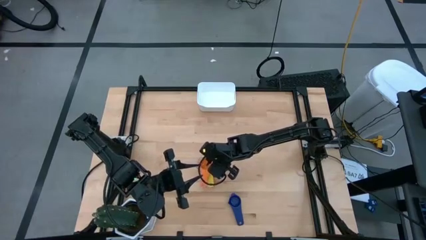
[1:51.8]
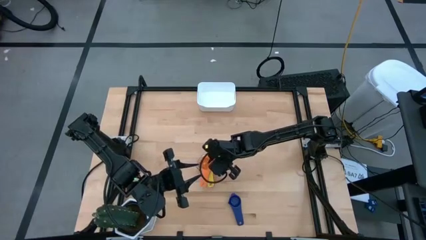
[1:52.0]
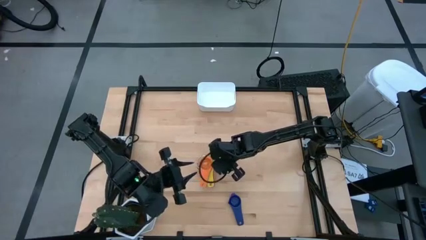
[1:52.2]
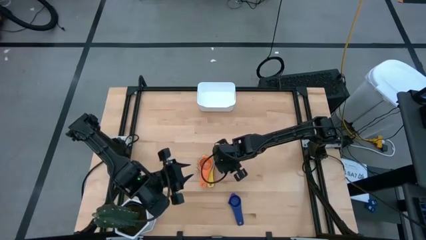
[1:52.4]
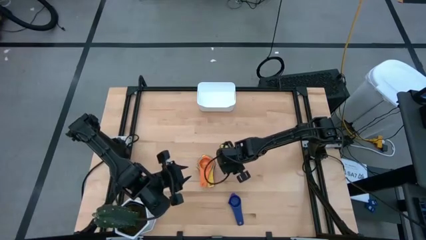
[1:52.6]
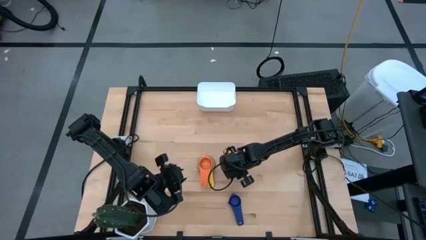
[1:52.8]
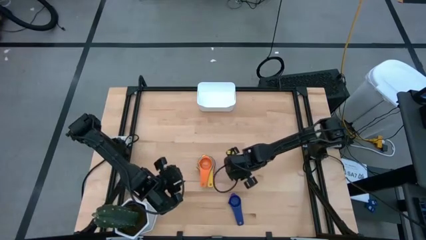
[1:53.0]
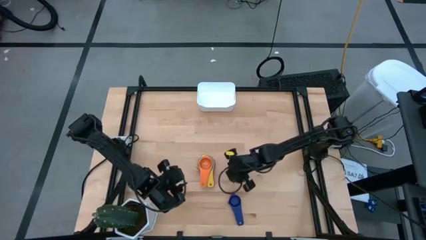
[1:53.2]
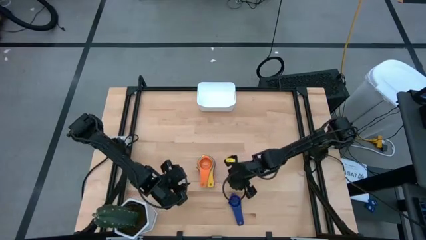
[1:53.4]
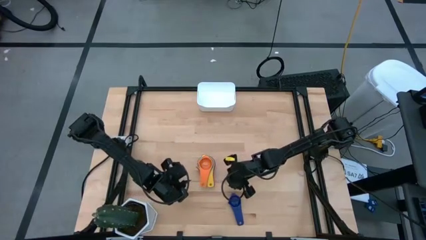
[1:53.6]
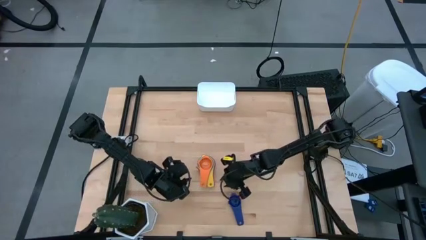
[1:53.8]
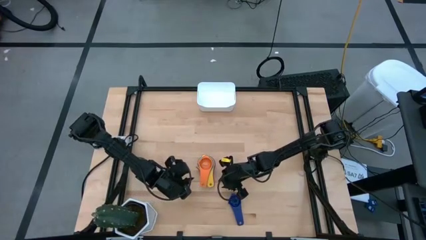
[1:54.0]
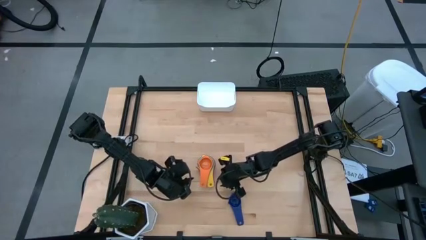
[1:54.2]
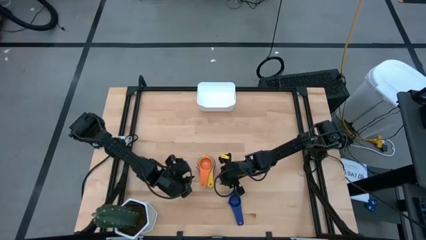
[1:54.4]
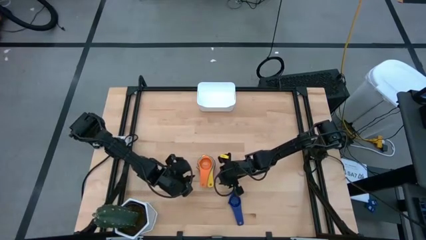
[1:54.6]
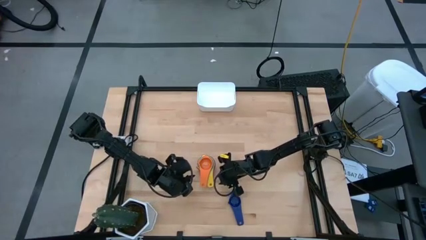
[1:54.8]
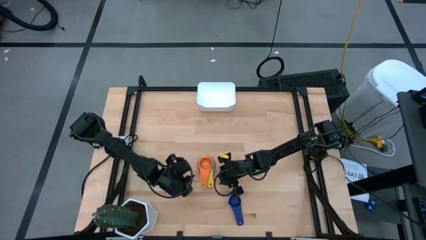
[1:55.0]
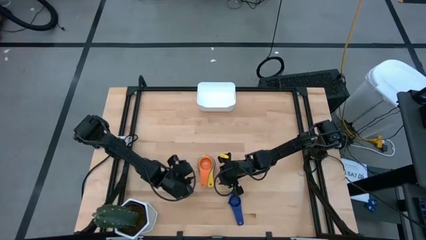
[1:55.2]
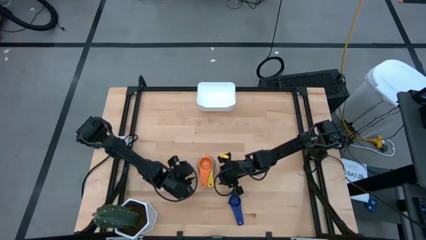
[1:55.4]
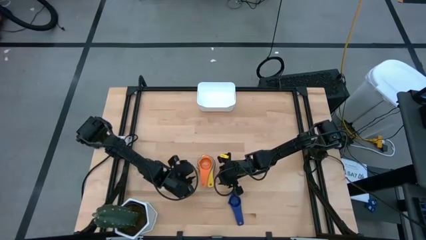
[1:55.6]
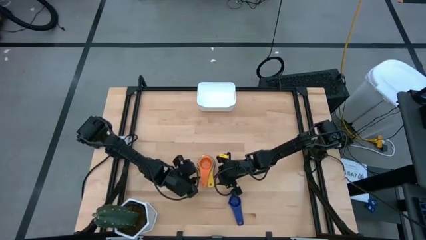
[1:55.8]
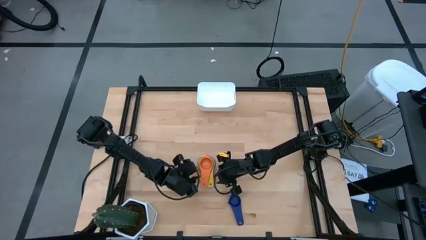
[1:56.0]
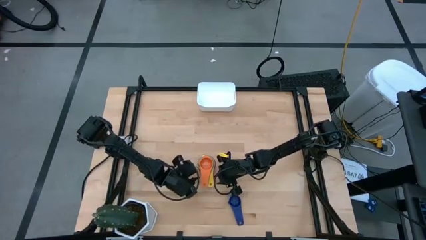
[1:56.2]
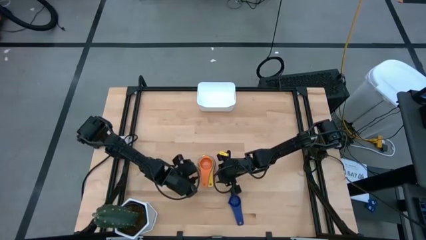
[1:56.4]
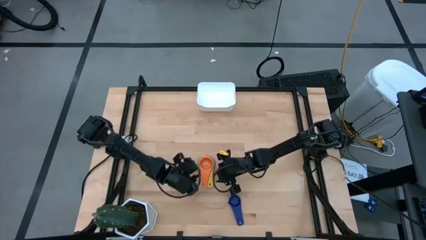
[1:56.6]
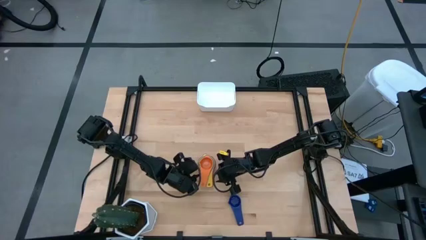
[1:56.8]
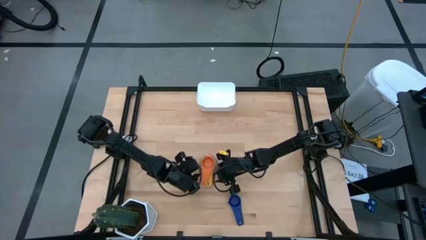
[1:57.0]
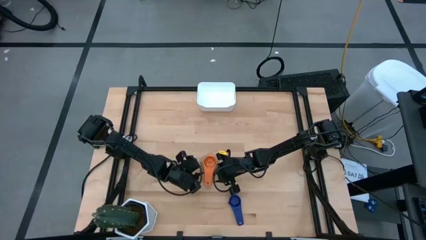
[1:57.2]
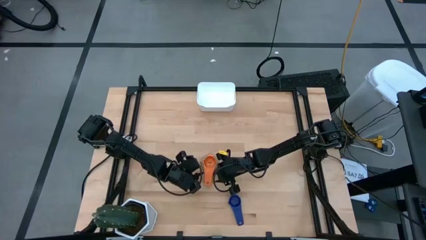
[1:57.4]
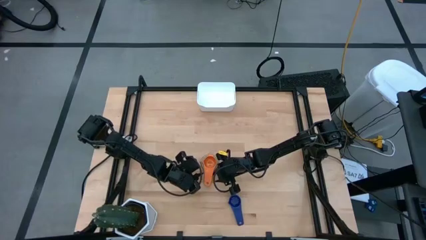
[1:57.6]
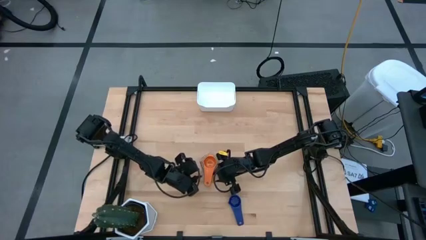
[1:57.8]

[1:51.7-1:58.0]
Task: Nest measuring cups in basket
Adjust the measuring cups

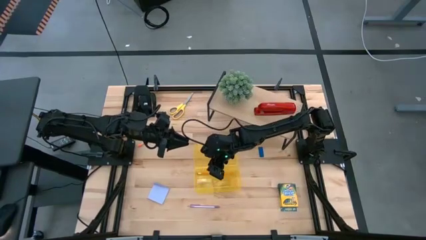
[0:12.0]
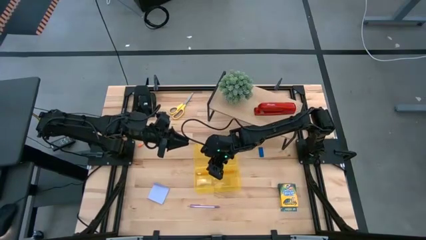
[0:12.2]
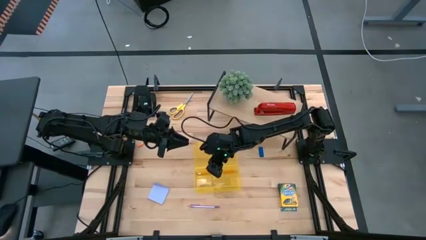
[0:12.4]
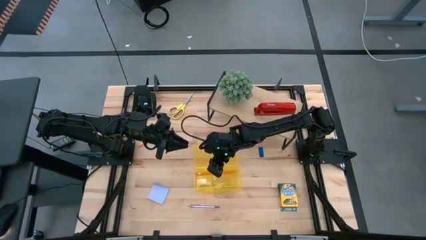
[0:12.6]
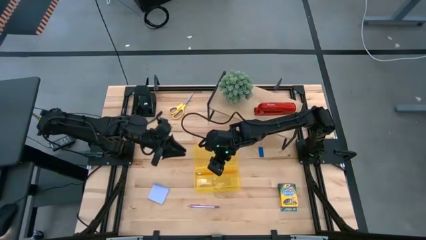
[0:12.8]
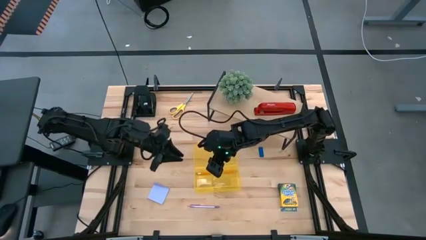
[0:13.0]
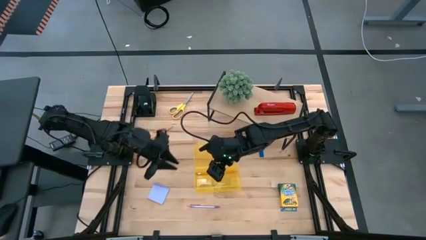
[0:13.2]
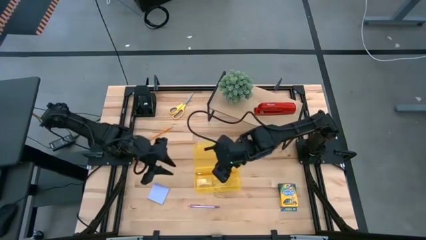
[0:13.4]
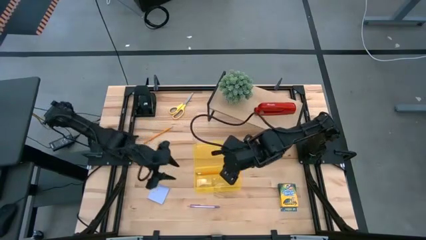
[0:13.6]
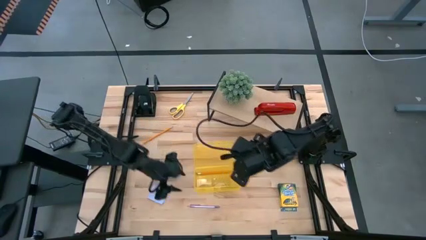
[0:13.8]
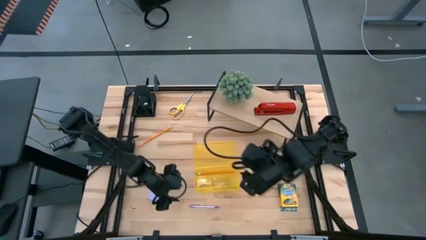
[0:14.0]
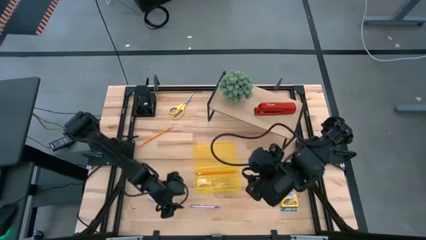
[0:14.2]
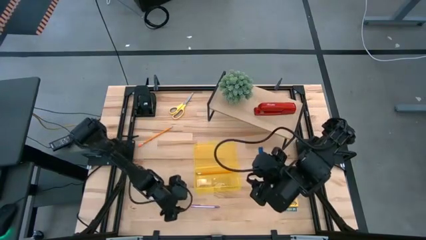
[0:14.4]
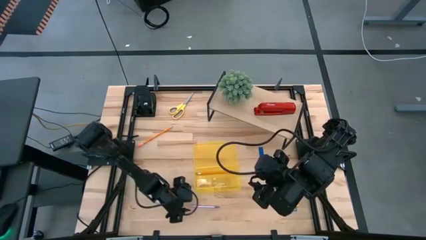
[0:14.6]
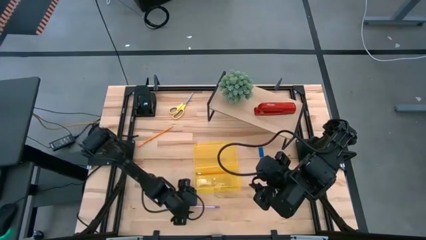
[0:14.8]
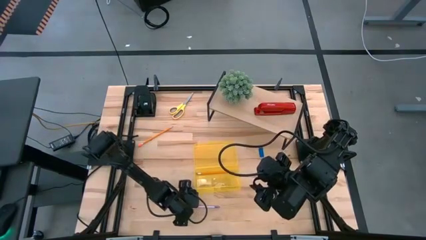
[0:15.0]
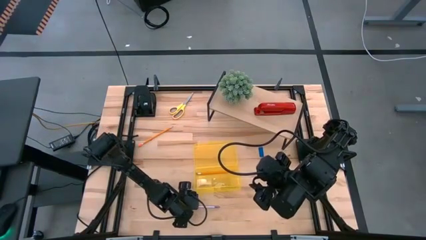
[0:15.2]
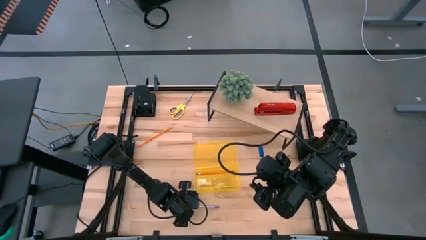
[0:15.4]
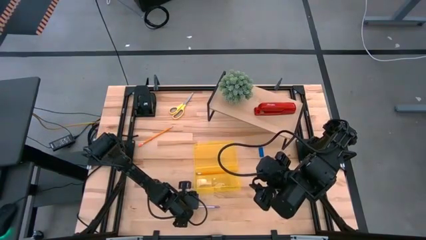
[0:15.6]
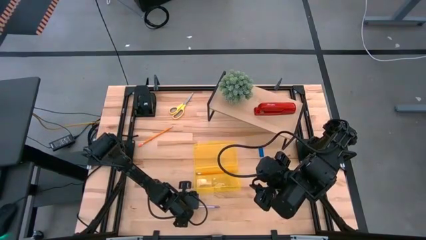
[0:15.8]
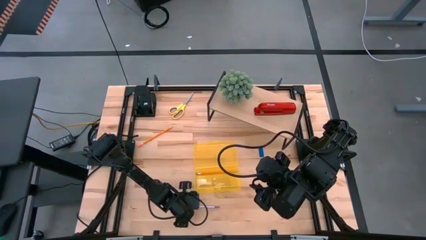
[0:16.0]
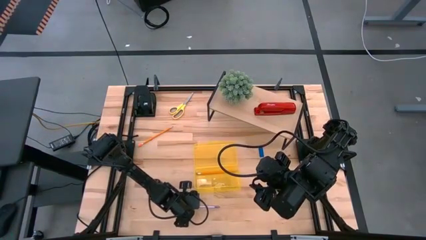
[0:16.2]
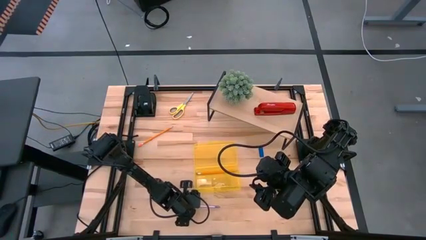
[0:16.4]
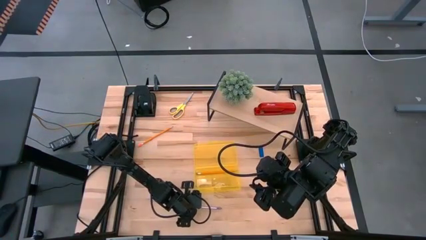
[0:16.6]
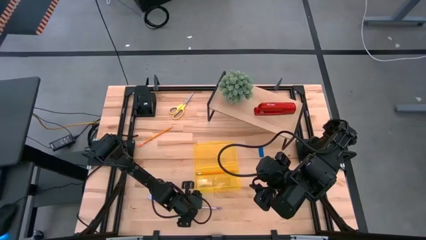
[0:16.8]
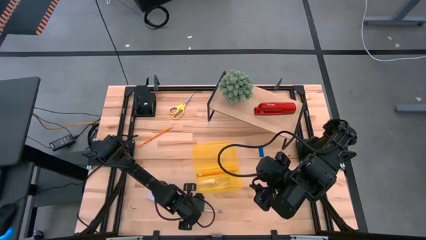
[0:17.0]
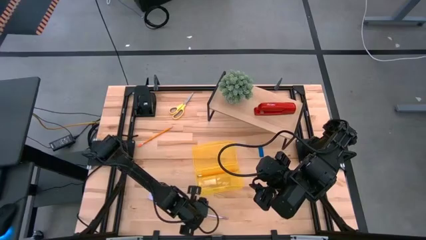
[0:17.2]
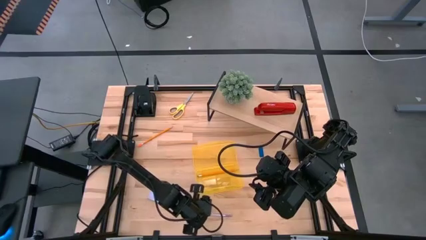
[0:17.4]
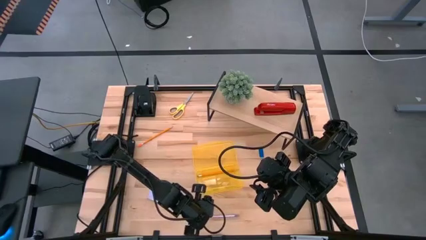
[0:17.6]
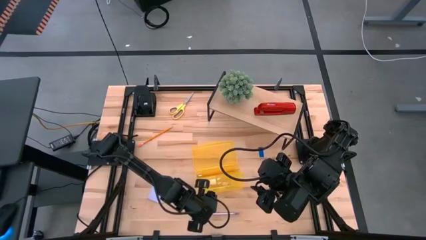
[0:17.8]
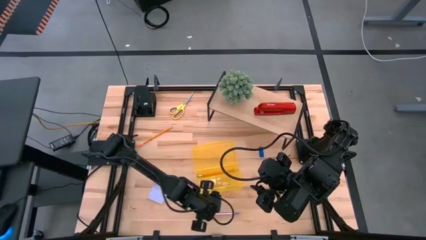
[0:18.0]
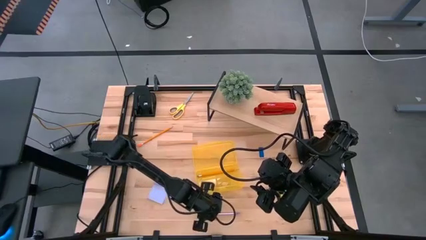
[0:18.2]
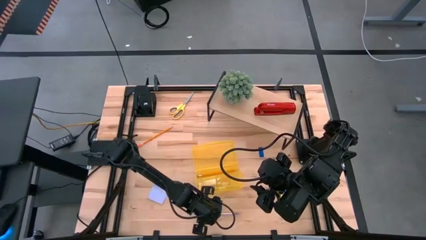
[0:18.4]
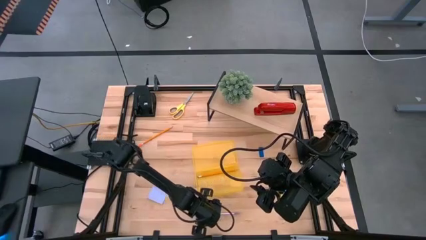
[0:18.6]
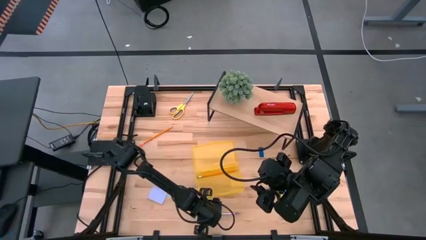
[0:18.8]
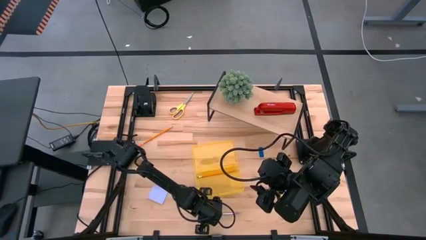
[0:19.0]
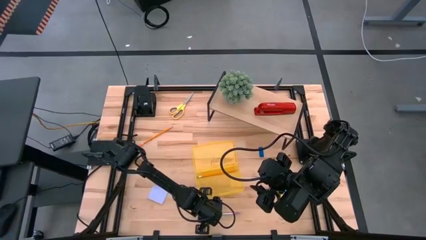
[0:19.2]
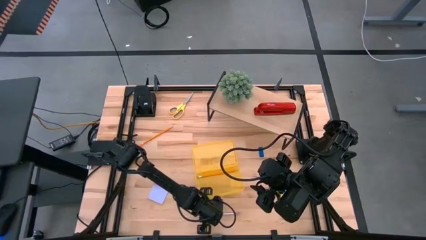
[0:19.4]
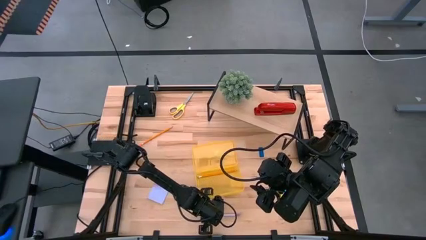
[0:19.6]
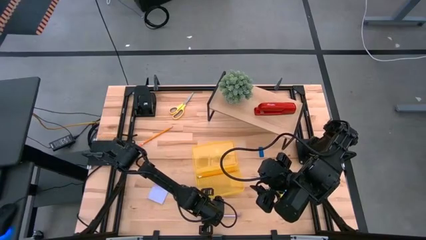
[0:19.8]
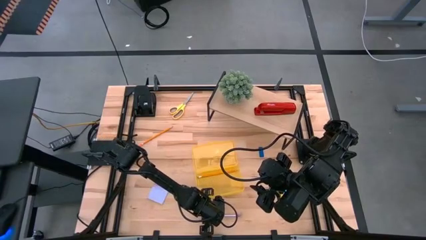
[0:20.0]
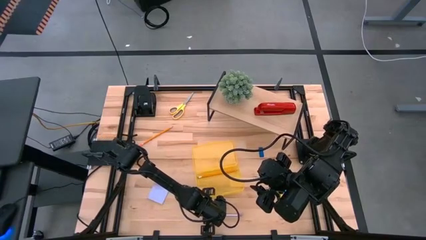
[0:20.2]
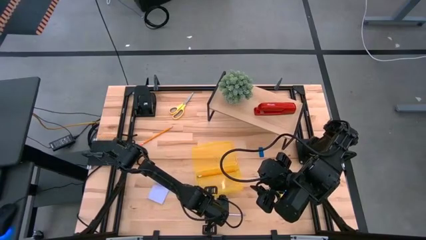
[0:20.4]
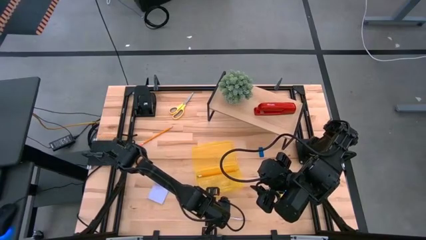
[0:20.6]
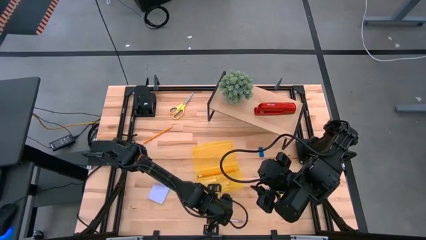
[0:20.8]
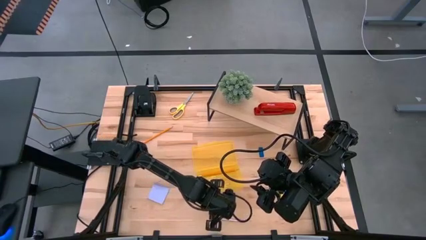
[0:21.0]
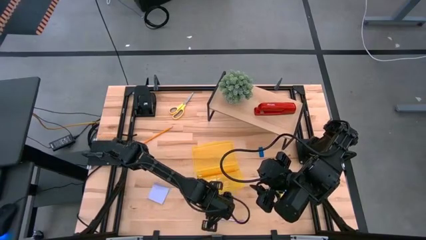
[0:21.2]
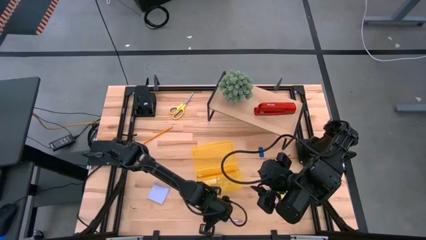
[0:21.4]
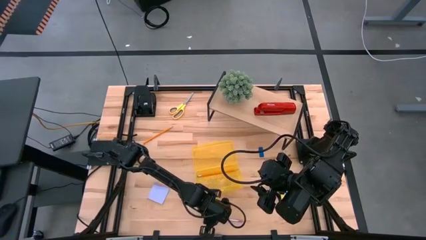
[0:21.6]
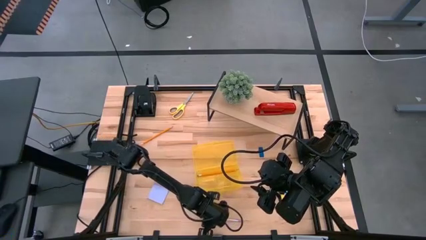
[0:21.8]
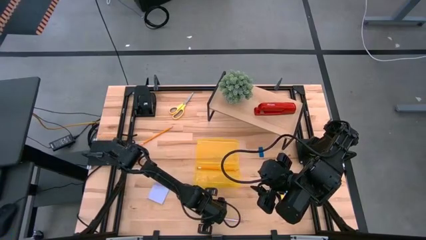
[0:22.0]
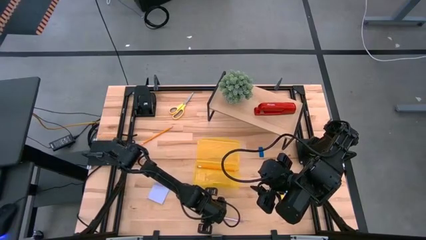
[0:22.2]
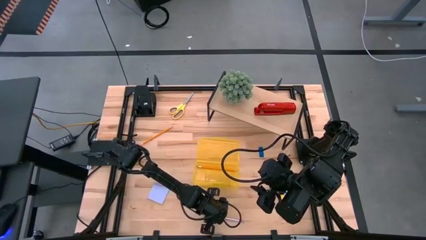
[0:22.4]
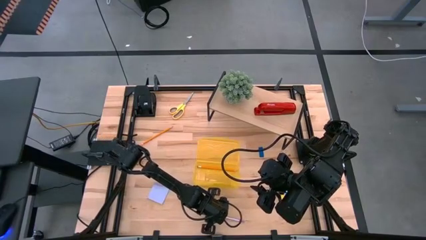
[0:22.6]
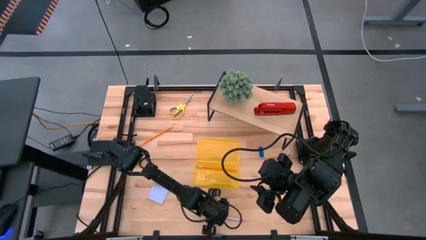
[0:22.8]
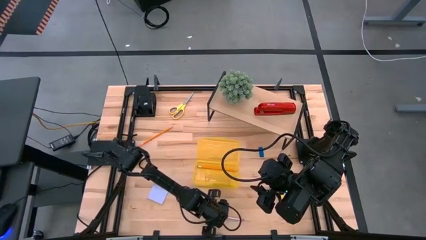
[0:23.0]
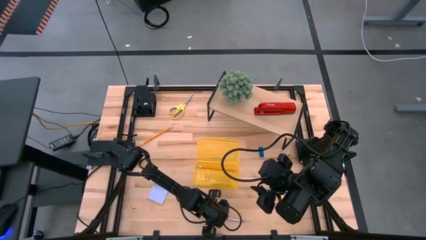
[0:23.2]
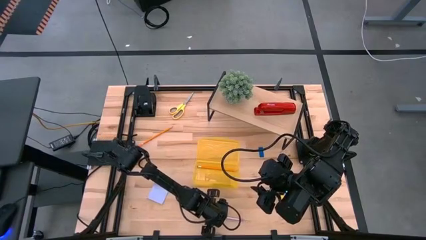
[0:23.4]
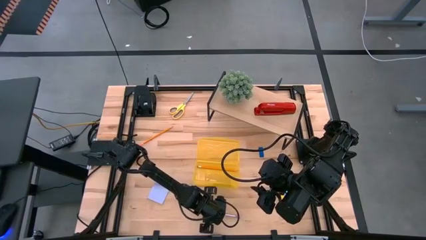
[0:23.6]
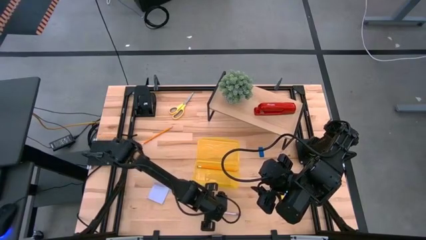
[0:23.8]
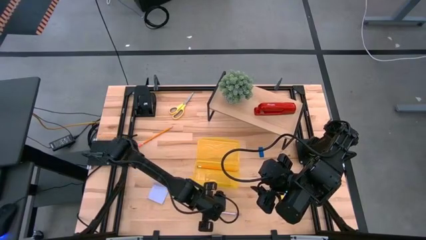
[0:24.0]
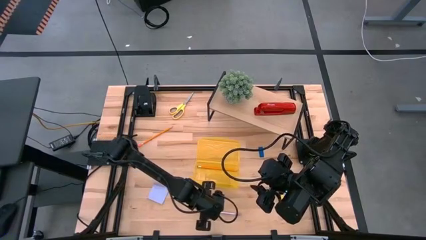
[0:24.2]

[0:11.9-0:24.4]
Task: Pack school essentials
Put the pen into the supply box
